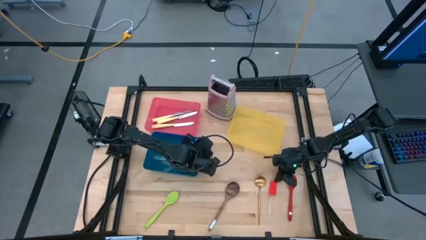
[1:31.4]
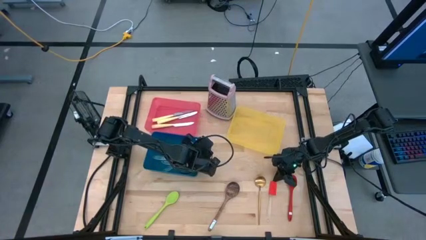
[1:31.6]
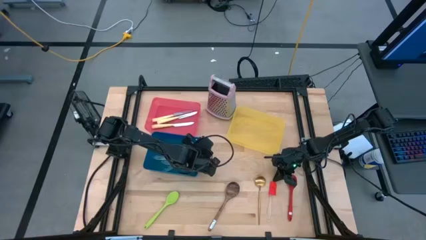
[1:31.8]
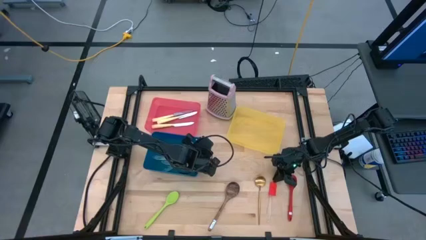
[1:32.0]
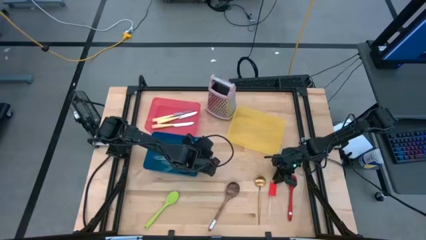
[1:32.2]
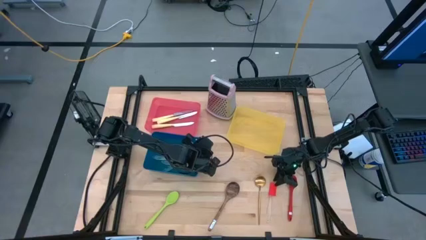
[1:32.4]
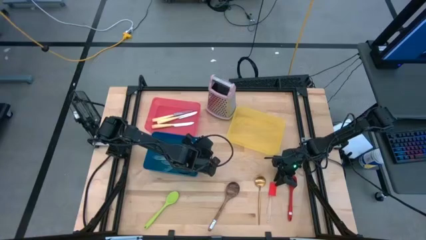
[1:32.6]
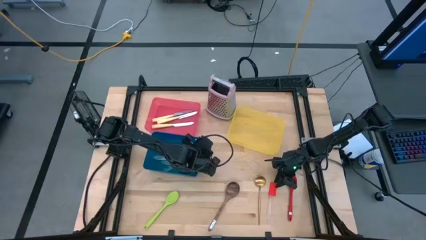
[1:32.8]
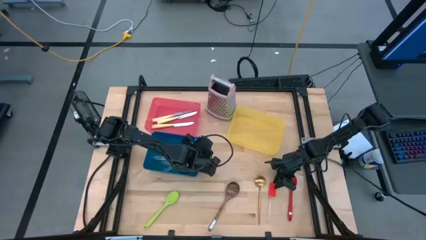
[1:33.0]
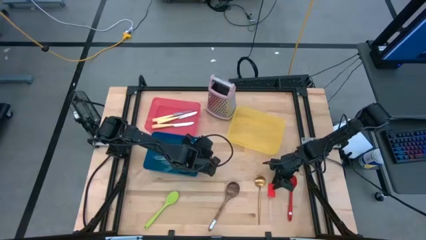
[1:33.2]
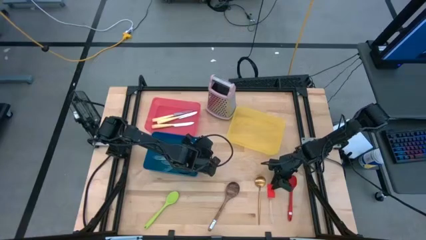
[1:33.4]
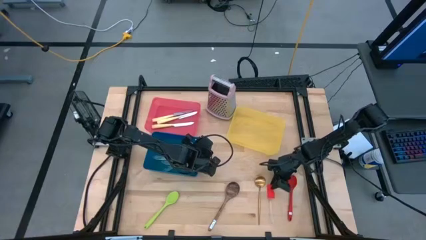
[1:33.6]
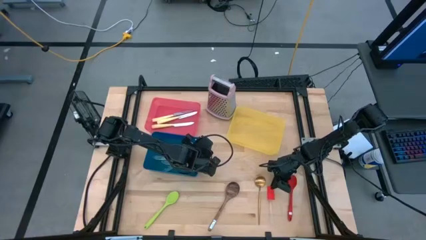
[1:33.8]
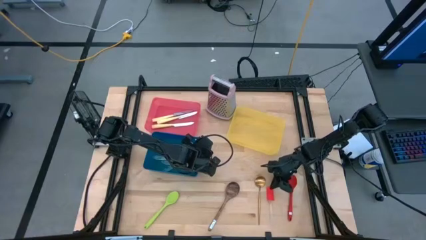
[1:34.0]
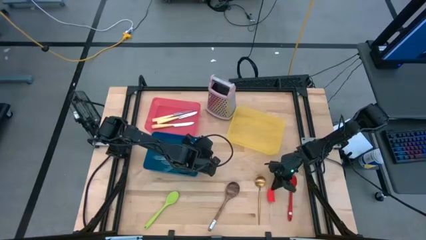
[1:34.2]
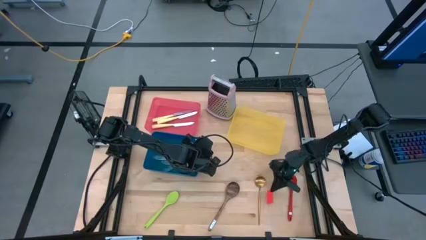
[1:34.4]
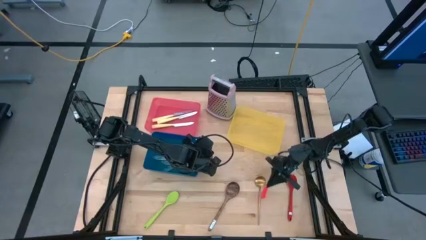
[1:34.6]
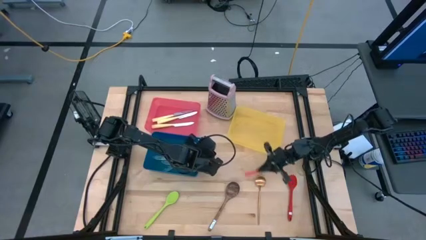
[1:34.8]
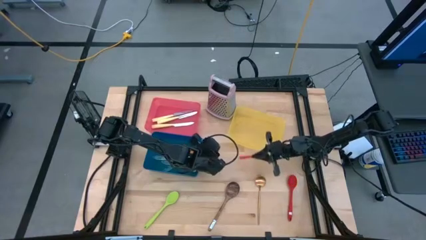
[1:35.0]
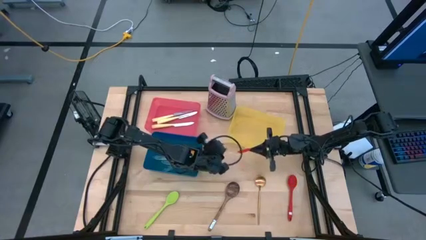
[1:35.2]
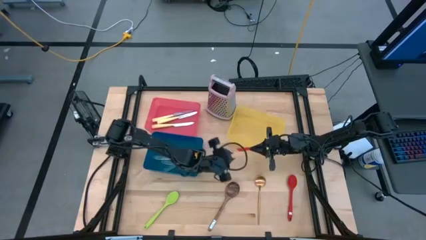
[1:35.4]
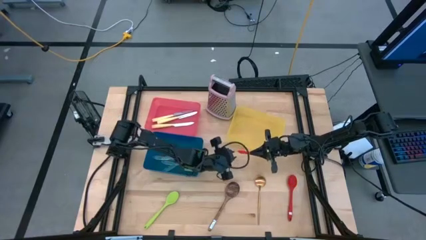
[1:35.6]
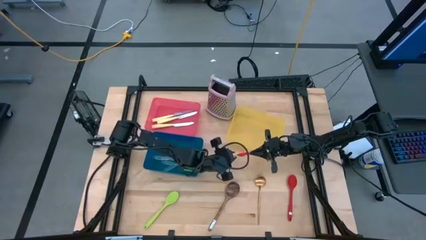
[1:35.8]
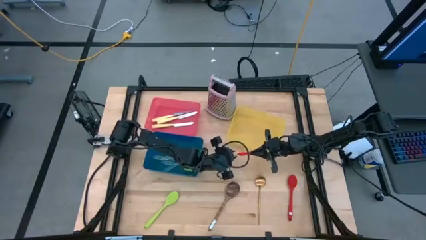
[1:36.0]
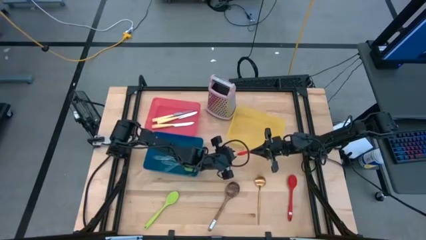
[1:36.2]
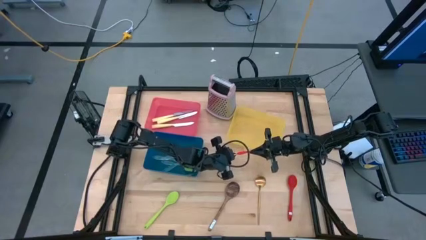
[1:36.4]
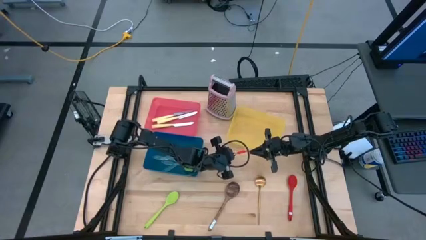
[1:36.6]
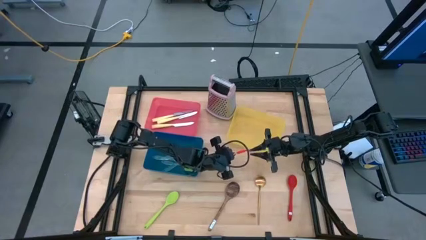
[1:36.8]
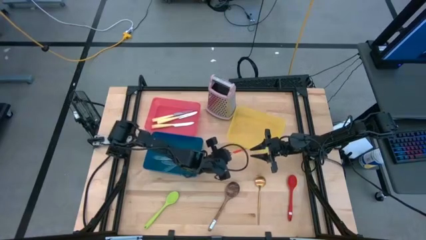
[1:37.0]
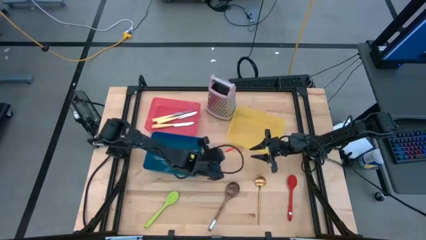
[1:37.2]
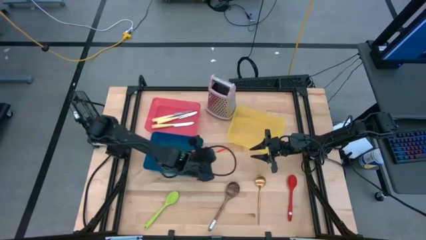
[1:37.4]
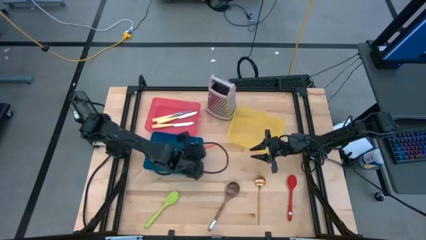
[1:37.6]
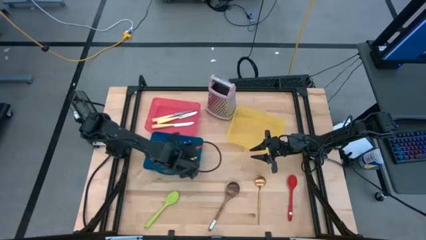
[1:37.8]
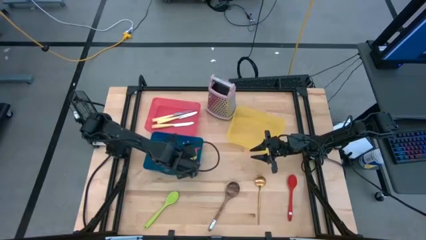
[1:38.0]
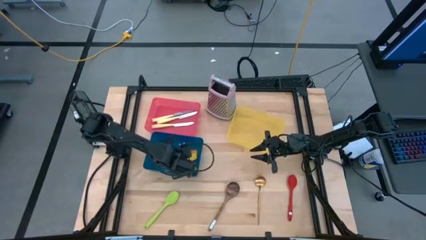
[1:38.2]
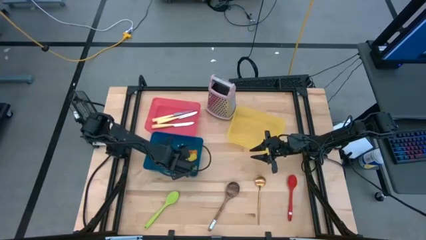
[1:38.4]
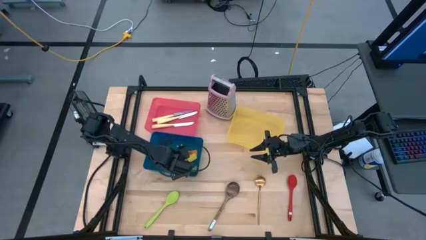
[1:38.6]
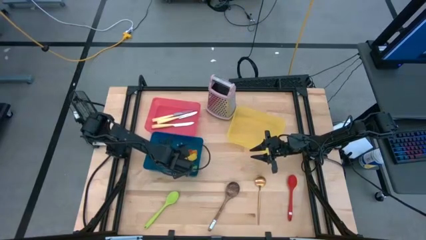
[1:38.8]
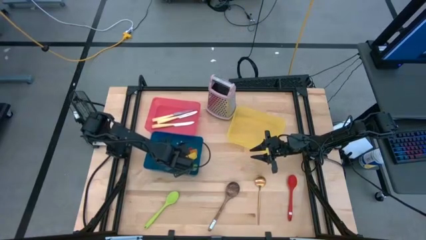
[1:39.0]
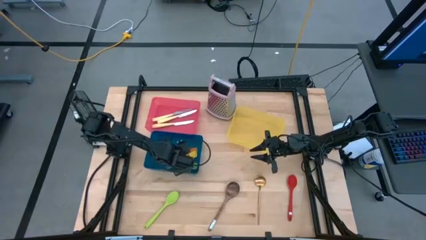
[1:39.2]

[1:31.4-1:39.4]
Task: Pick & Place Kitchen Items
Put the red spatula into the blue bin

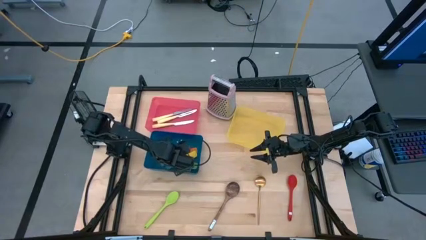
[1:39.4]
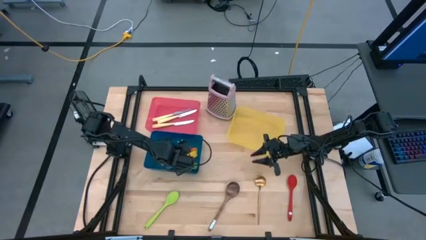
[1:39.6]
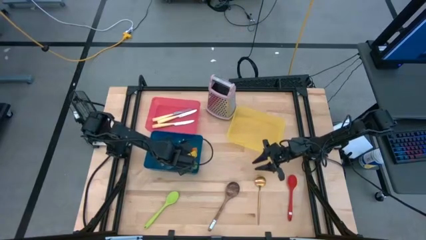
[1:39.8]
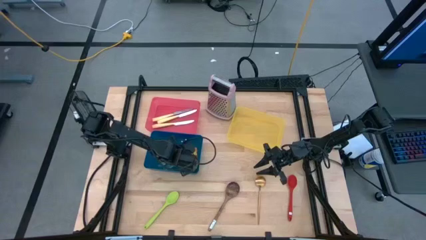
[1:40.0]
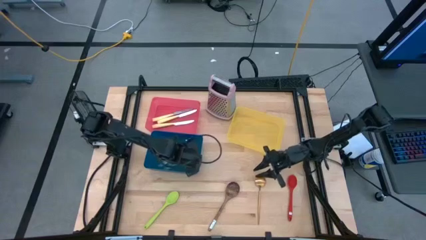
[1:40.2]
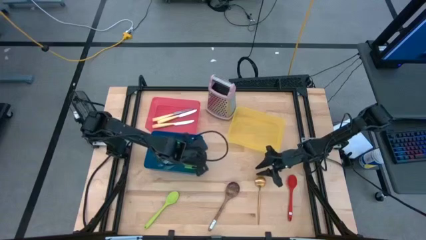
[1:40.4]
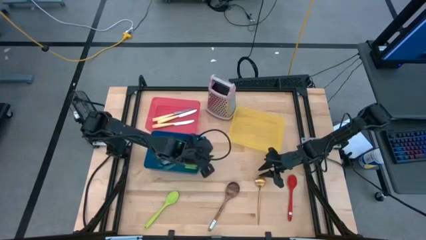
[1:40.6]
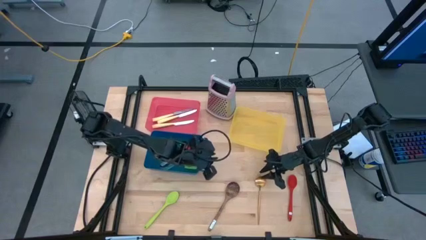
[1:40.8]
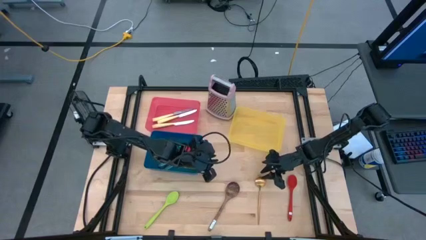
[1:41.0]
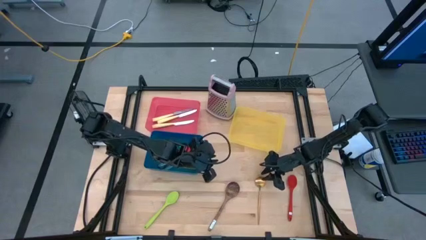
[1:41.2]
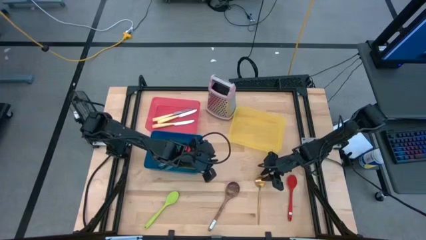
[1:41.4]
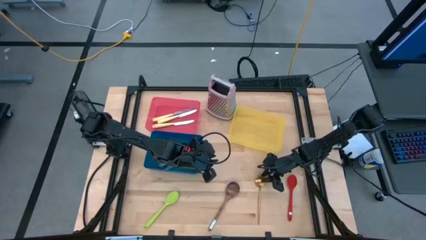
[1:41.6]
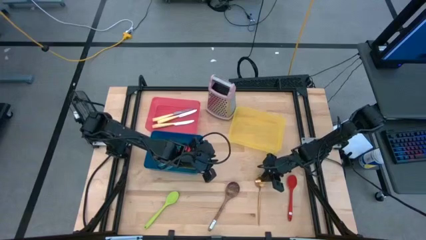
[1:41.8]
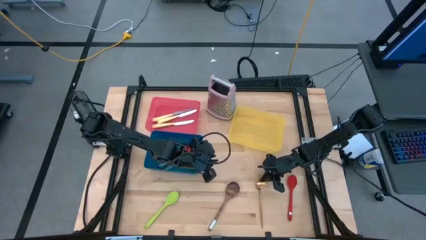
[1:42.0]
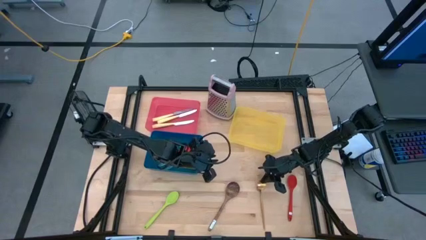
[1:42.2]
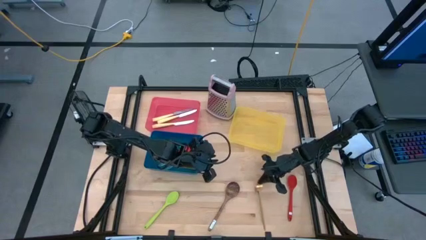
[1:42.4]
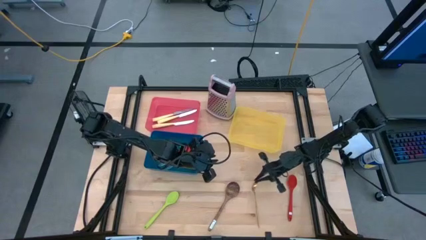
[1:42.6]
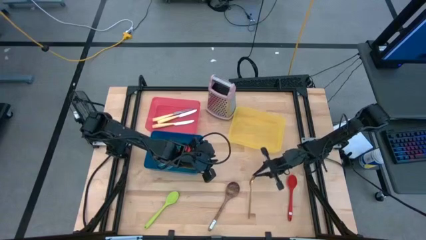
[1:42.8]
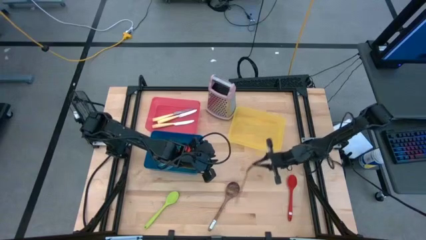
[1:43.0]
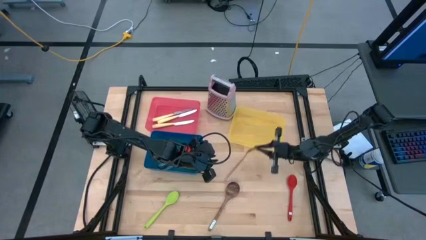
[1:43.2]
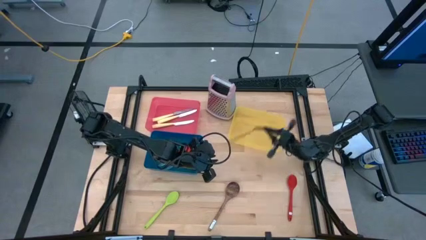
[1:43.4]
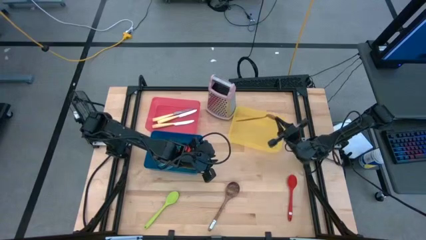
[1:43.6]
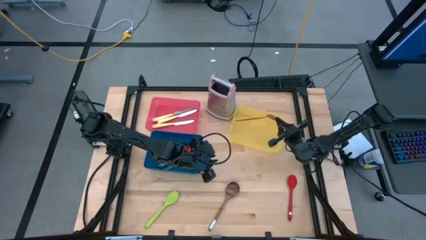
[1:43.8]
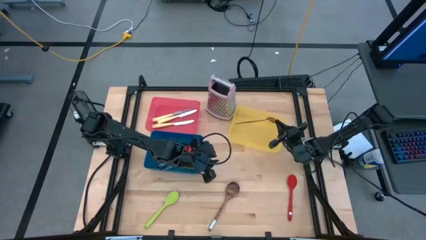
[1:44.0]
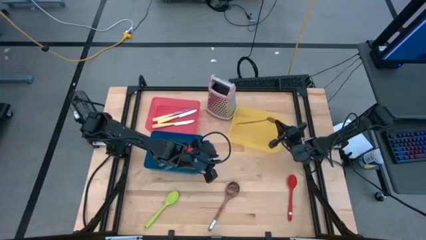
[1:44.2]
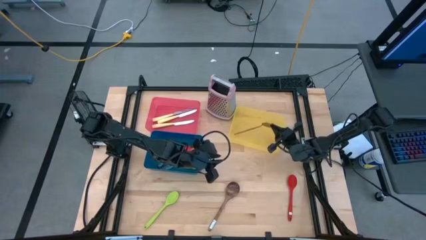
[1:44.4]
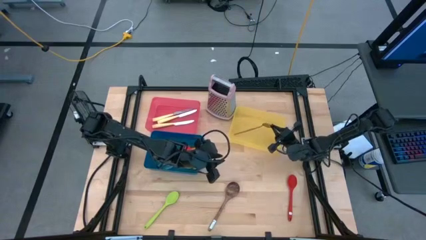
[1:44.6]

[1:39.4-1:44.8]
Put the gold spoon into the yellow bin

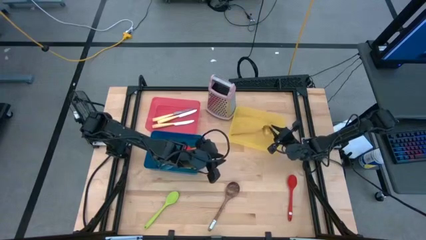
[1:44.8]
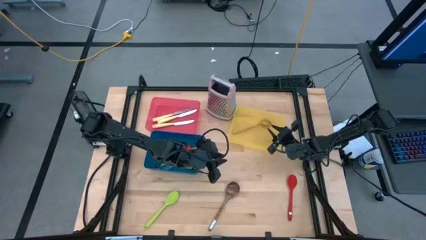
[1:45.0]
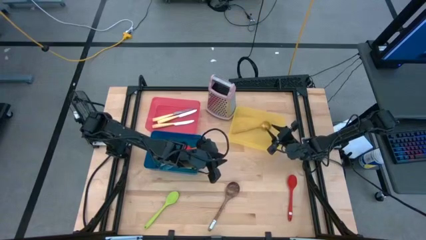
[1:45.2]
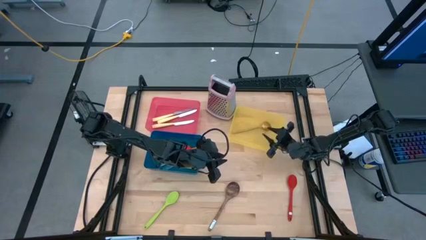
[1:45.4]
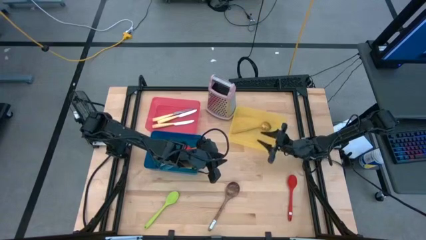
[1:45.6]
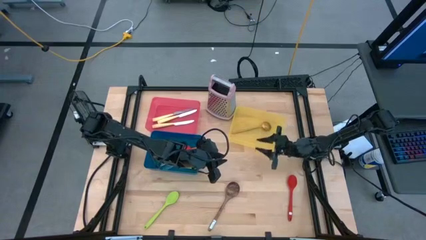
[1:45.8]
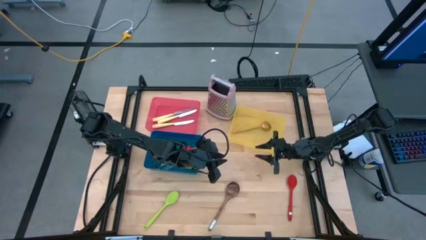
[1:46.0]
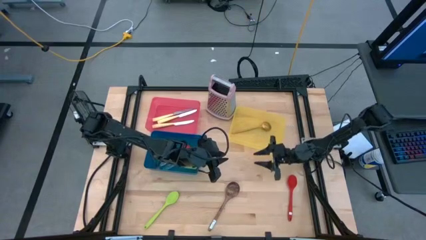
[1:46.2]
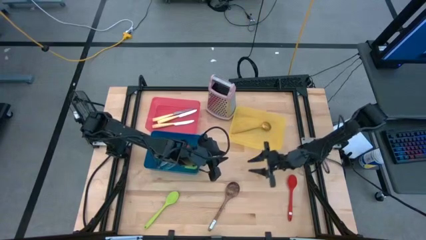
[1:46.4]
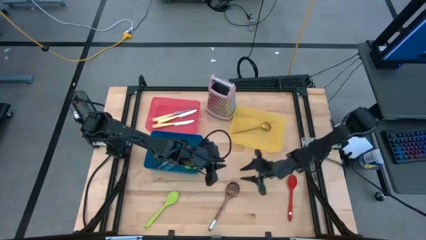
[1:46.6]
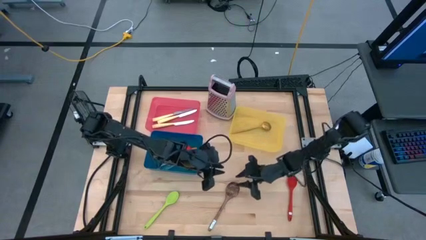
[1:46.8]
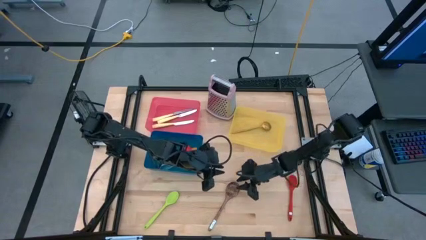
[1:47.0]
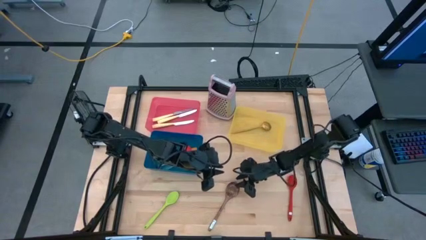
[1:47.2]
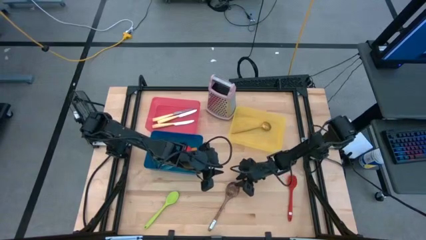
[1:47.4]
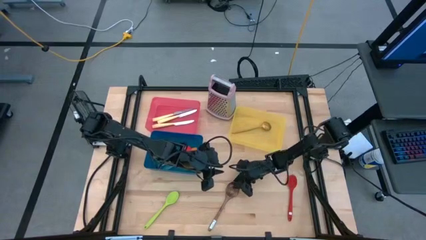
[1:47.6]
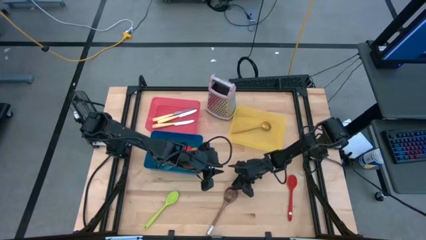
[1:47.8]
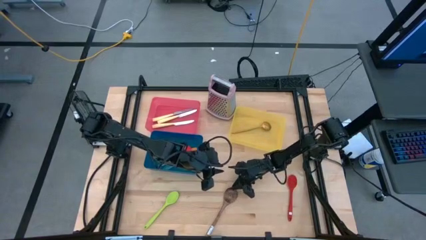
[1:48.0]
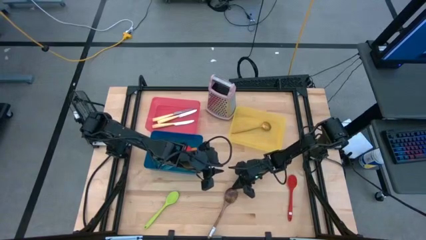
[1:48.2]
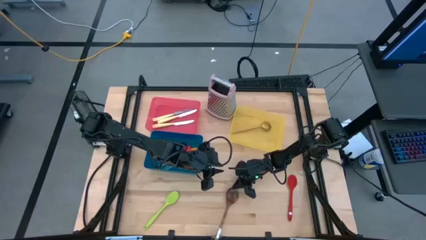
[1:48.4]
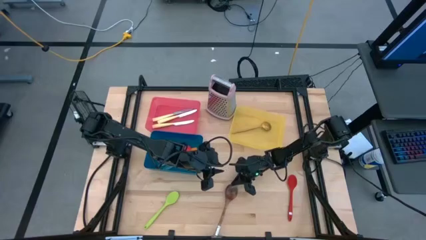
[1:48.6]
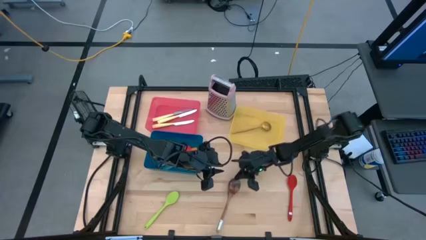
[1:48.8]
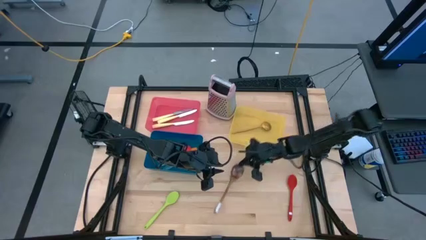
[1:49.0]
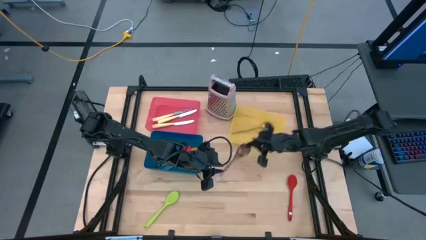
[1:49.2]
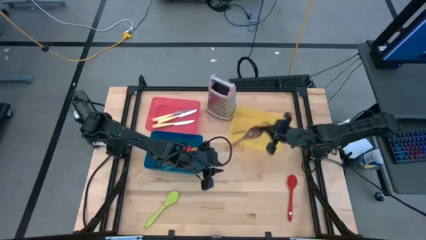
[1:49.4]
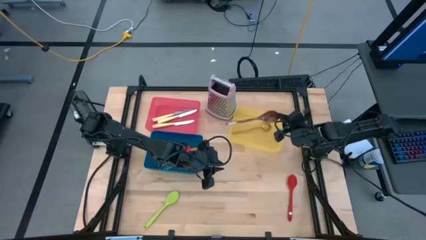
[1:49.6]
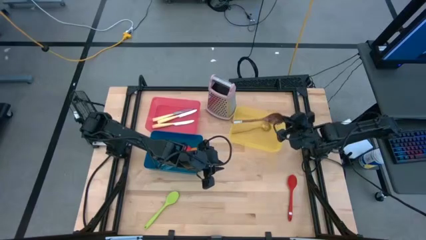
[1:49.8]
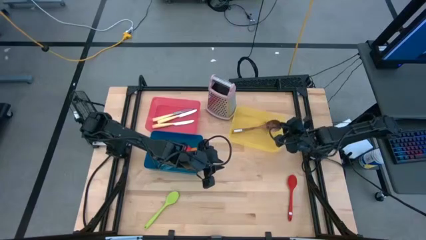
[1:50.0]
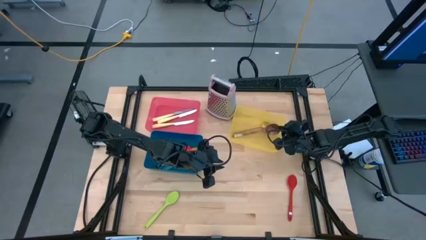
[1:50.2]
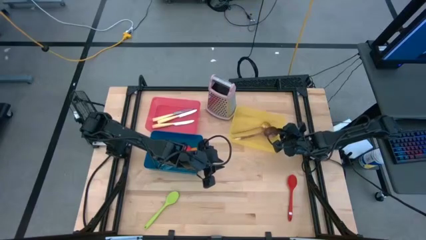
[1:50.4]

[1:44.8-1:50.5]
Put the wooden spoon into the yellow bin
